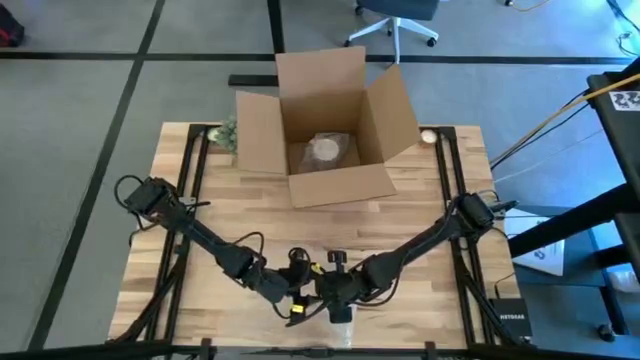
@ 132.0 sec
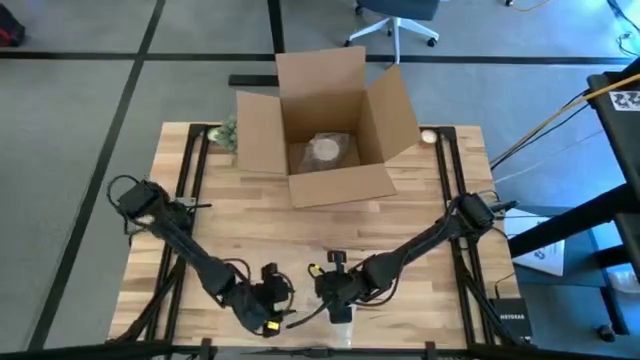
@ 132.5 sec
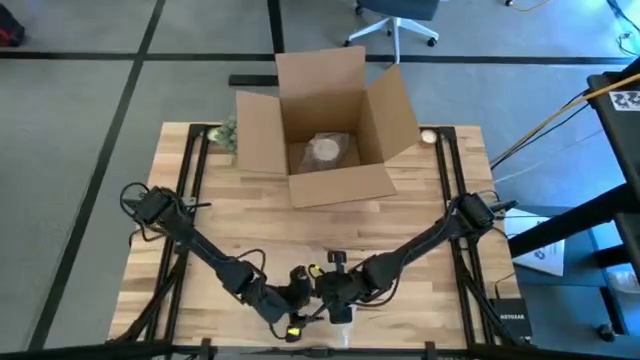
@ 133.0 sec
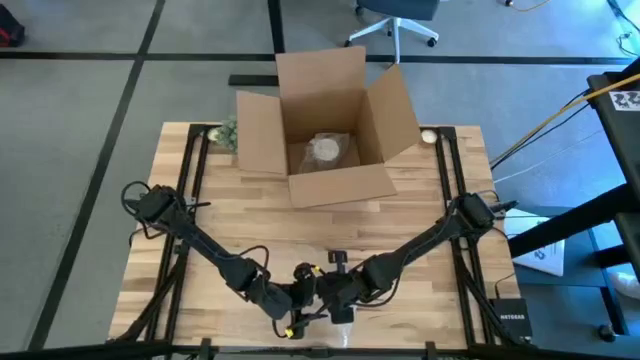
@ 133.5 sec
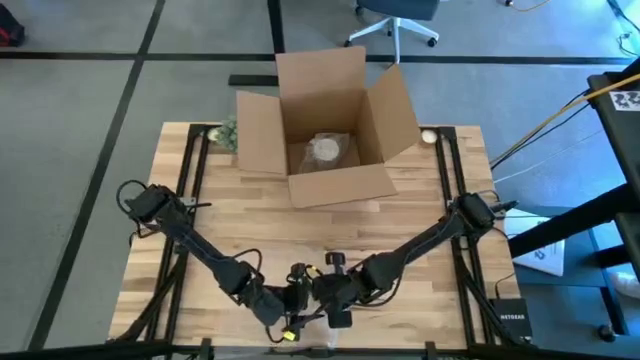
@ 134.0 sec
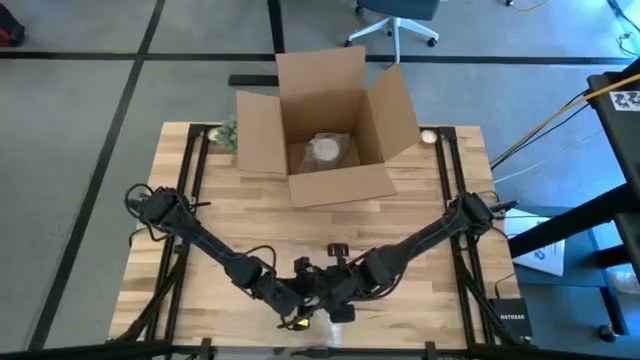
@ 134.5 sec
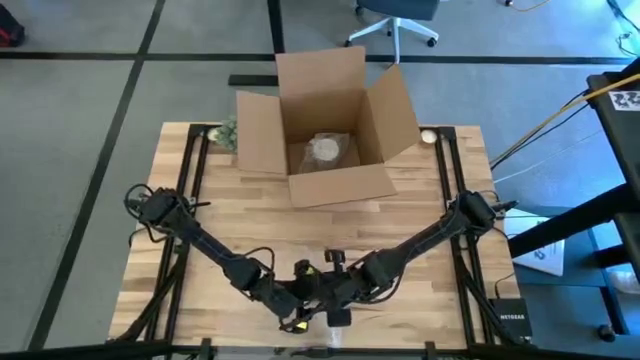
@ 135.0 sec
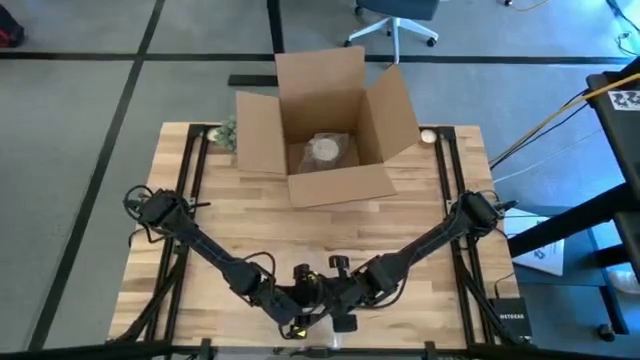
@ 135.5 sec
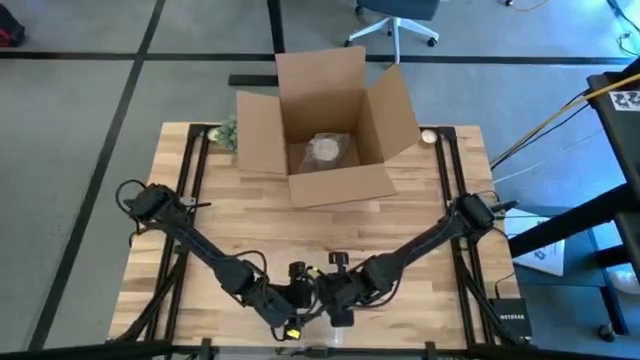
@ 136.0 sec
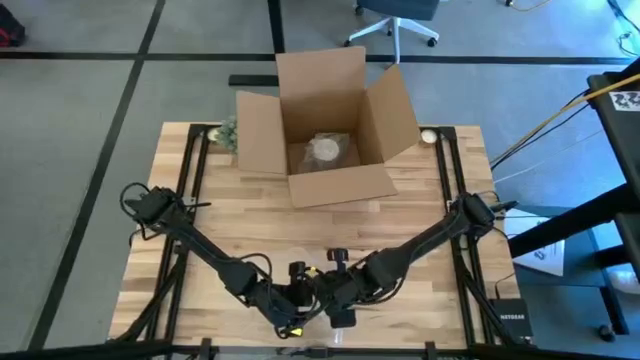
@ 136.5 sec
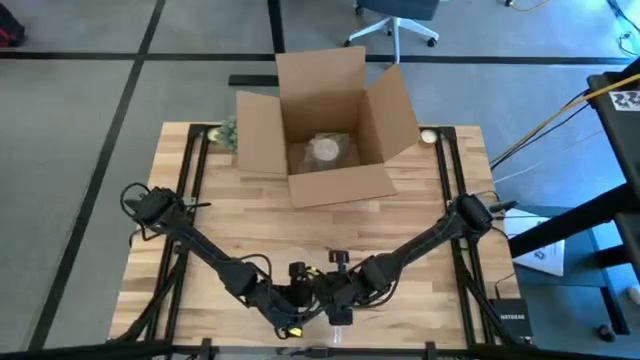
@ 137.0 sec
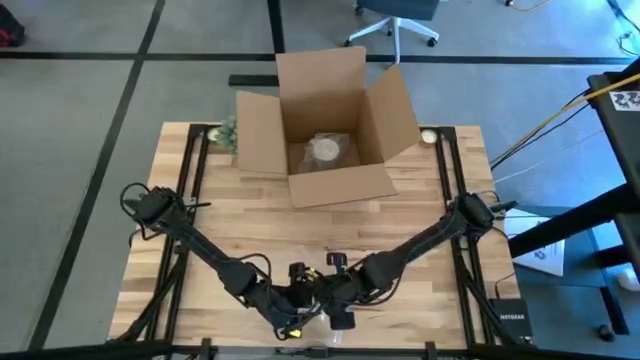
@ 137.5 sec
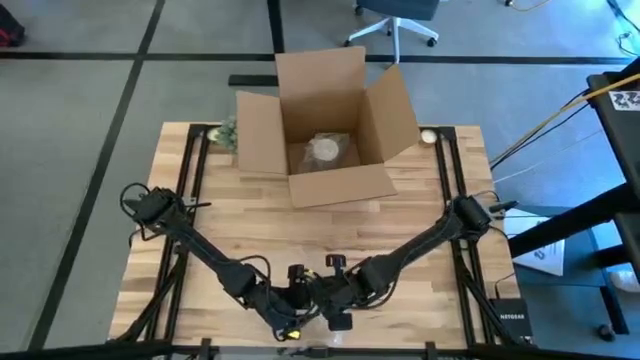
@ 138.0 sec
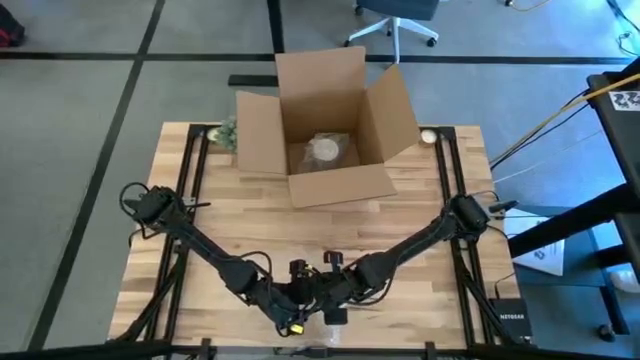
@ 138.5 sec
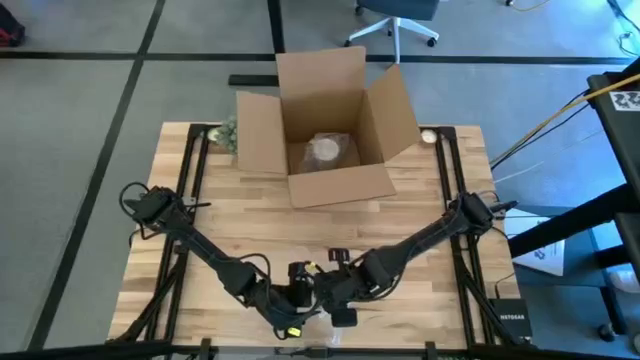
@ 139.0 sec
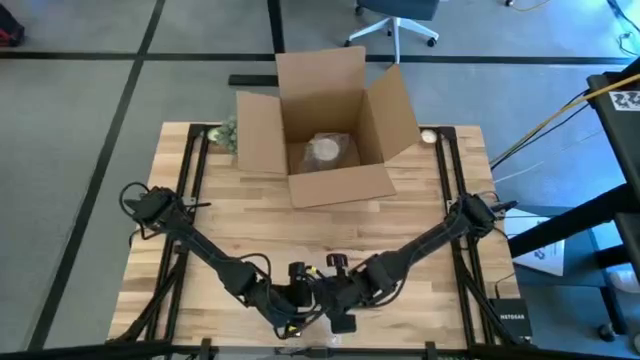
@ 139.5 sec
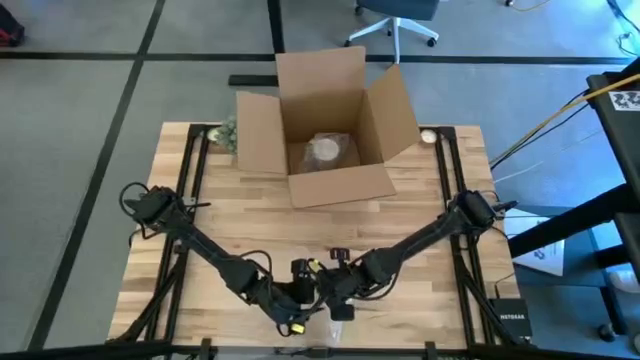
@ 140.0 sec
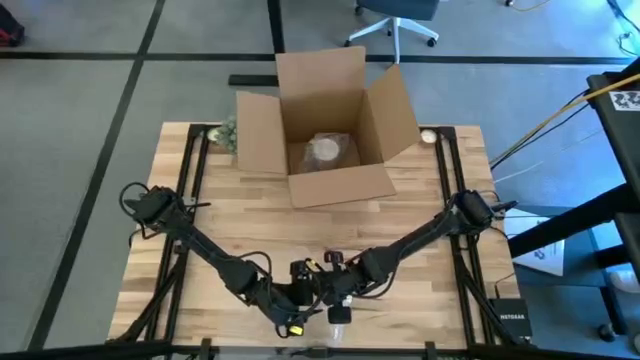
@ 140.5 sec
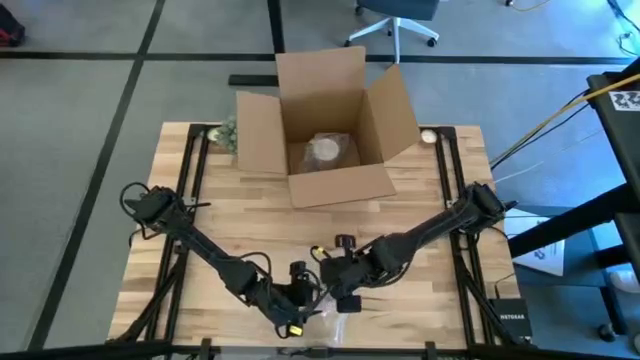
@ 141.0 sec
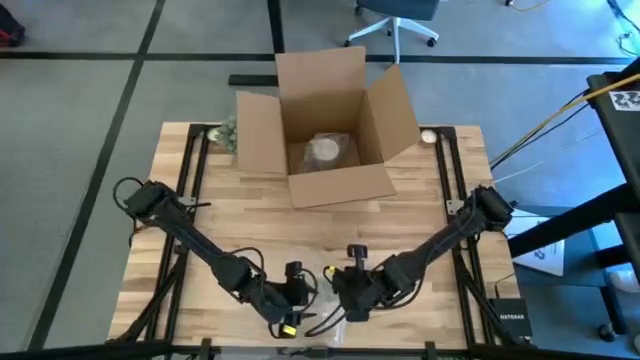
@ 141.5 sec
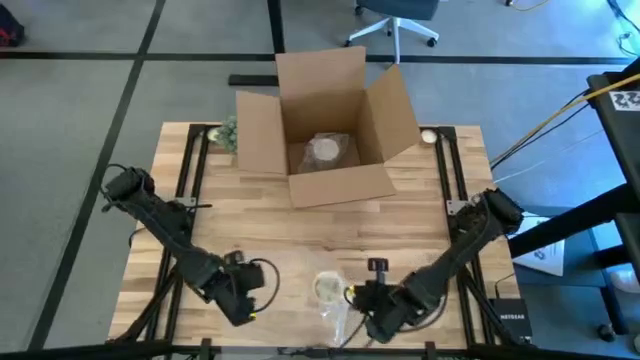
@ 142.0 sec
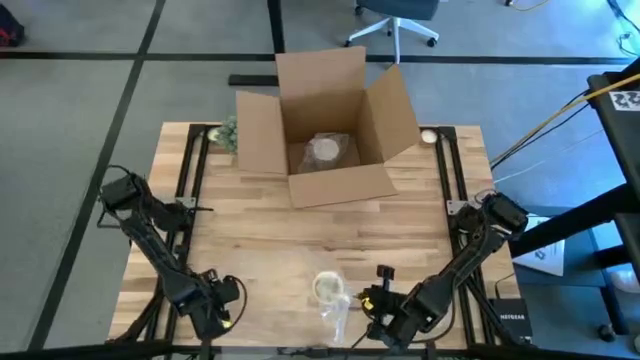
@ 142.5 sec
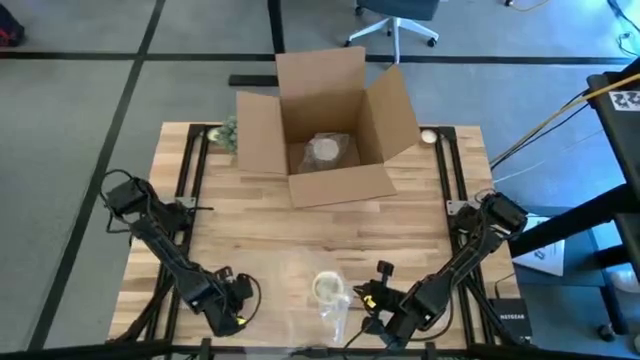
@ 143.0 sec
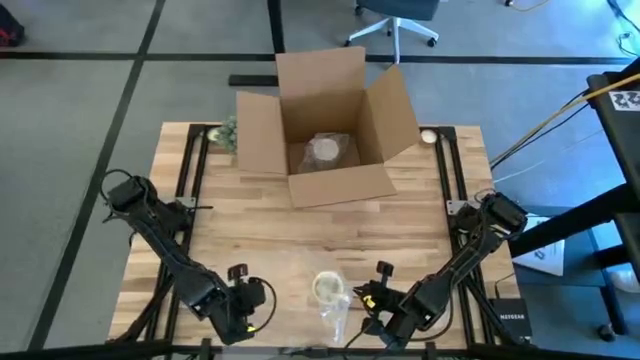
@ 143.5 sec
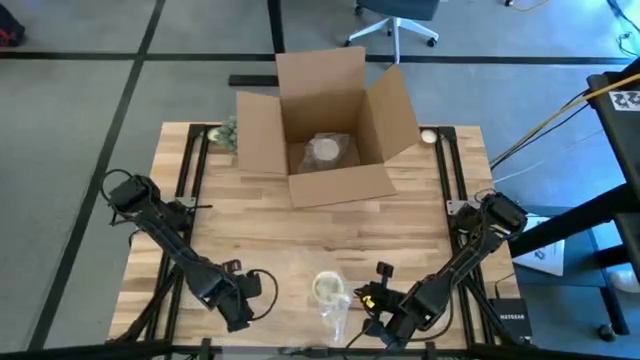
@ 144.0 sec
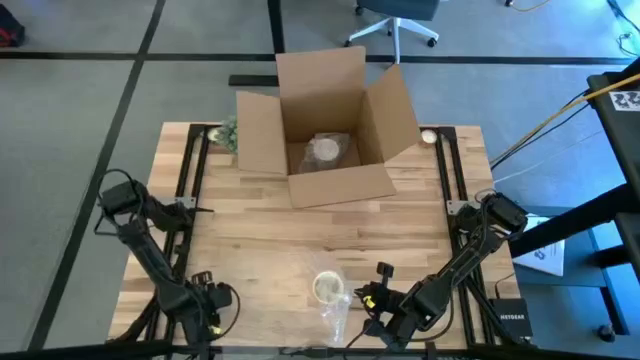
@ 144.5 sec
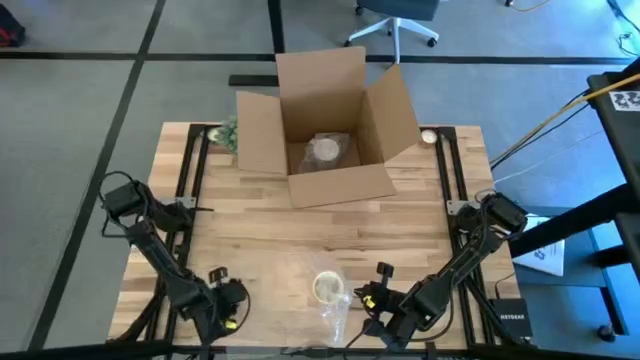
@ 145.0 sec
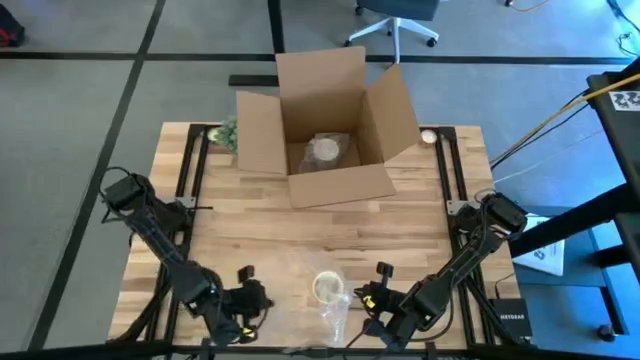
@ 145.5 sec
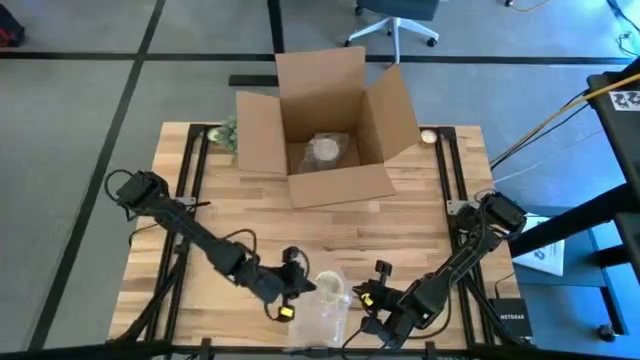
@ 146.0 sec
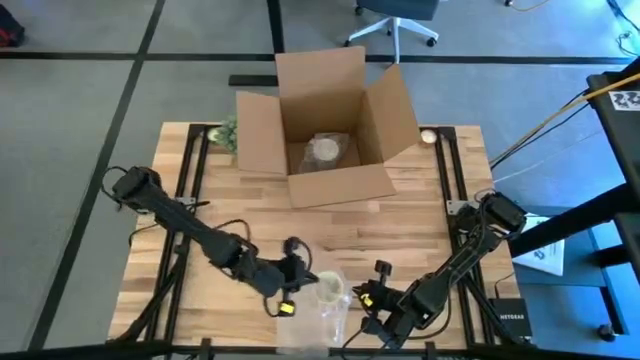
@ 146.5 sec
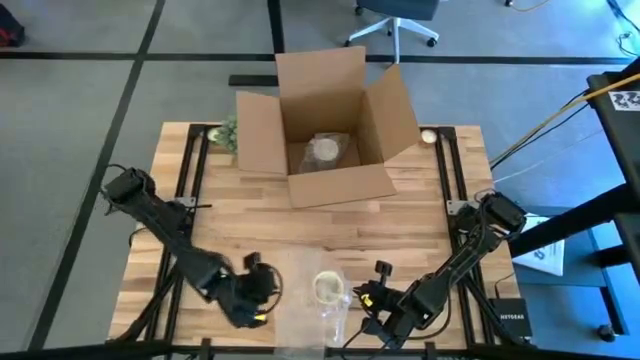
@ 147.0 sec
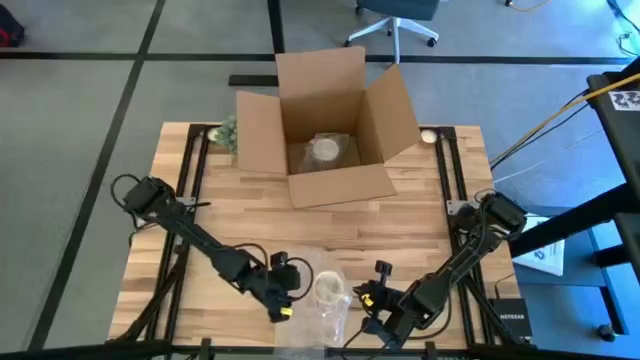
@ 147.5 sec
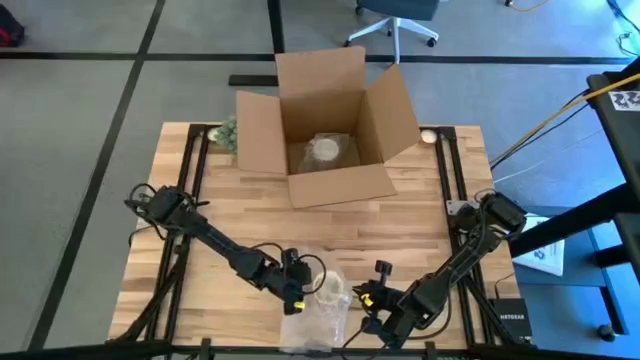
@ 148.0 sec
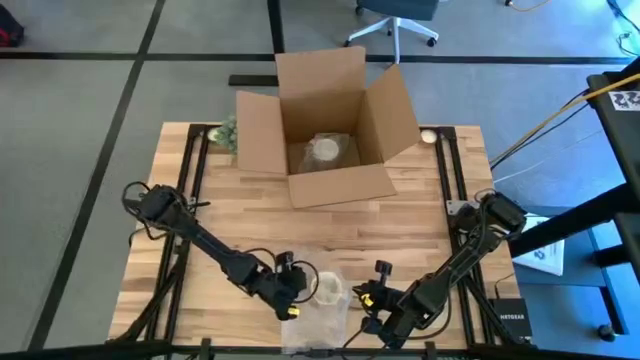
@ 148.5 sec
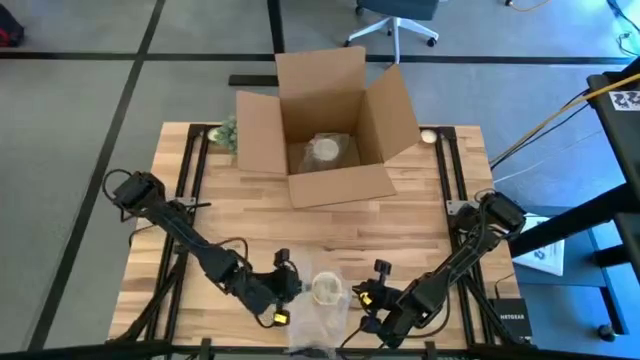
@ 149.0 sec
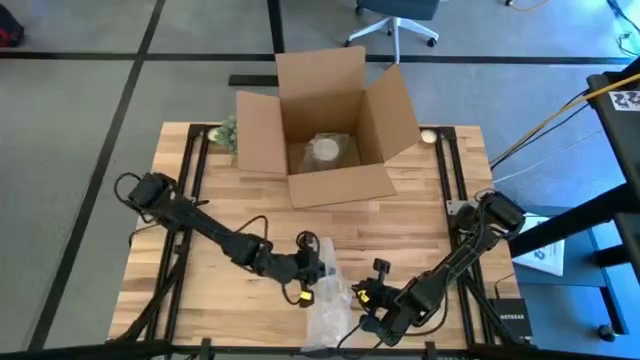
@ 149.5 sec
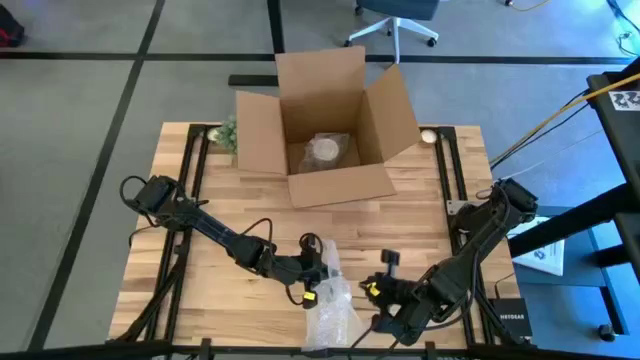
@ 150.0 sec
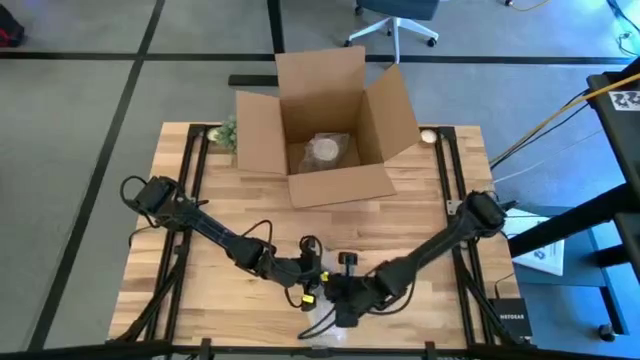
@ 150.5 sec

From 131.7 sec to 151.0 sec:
Task: wrap mug
Wrap the orange mug with transparent bubble wrap
